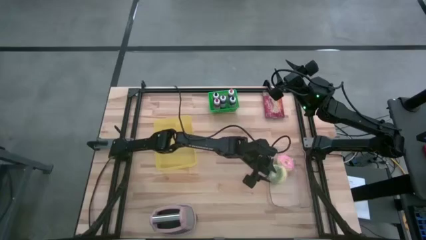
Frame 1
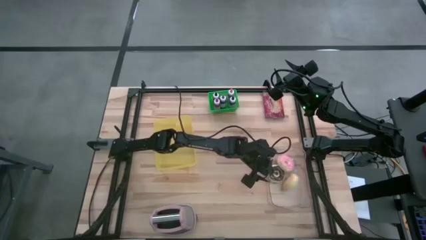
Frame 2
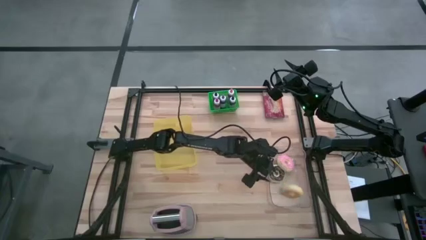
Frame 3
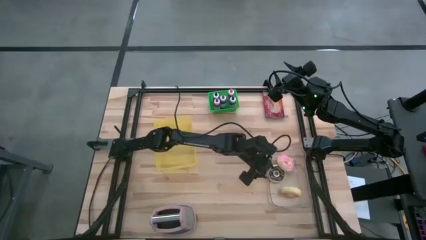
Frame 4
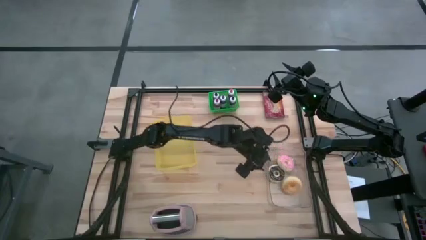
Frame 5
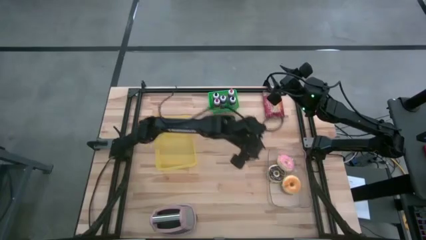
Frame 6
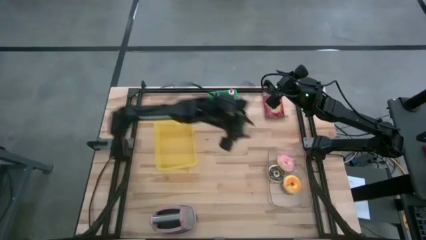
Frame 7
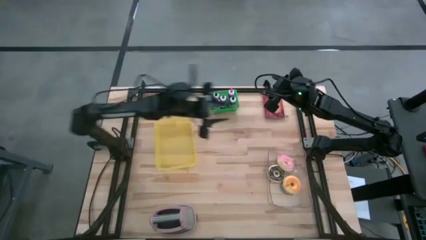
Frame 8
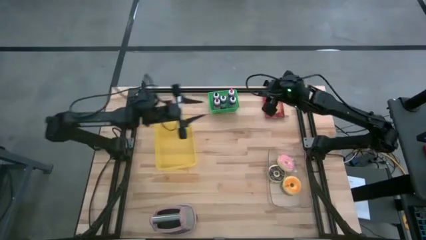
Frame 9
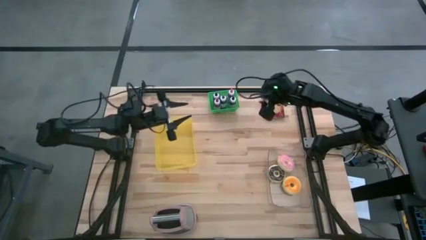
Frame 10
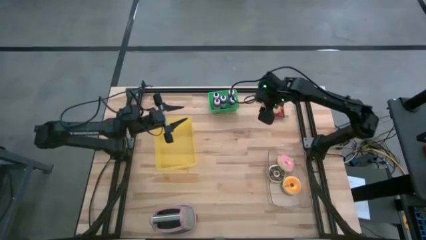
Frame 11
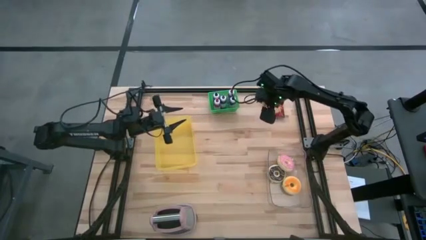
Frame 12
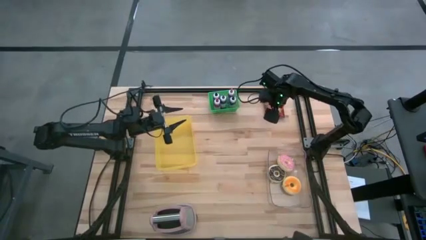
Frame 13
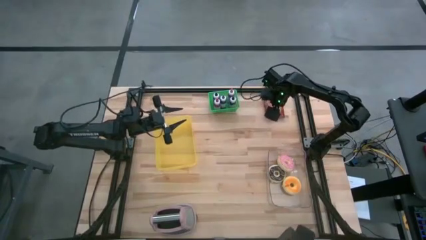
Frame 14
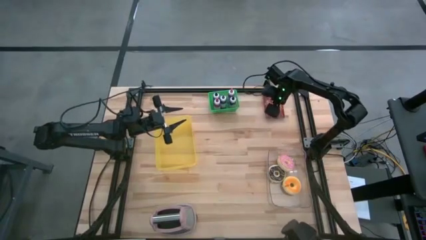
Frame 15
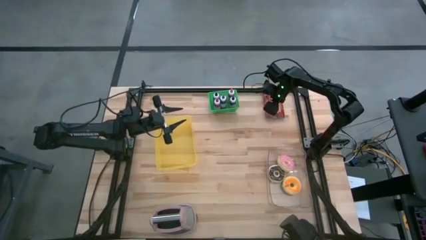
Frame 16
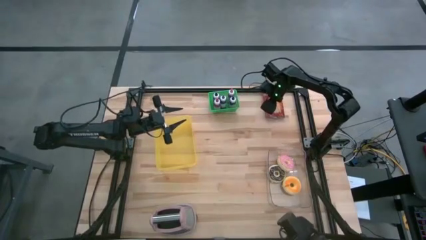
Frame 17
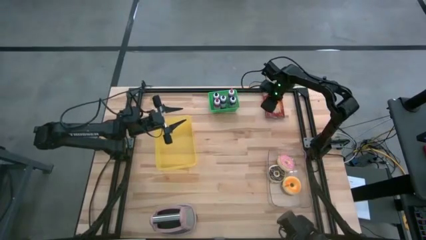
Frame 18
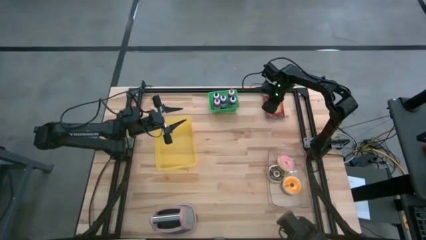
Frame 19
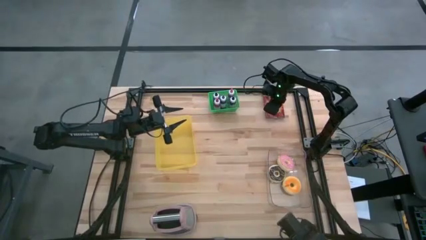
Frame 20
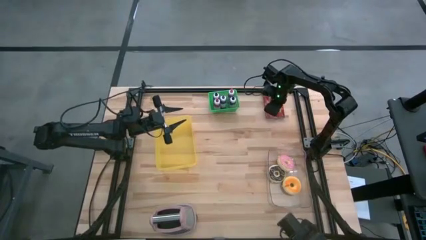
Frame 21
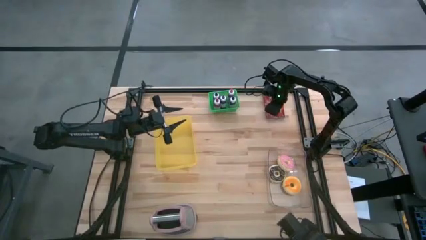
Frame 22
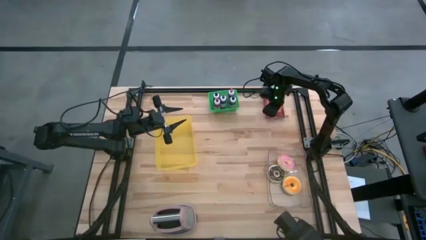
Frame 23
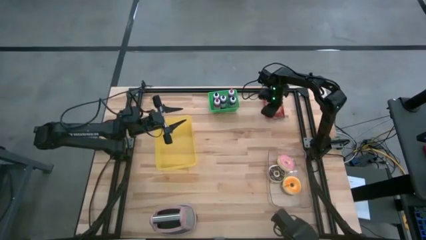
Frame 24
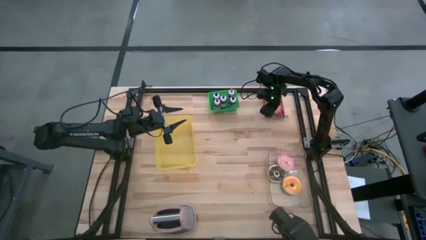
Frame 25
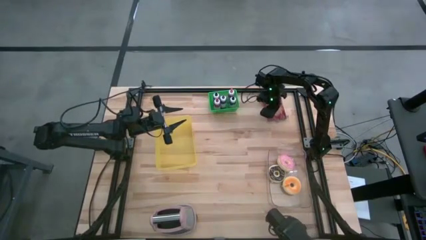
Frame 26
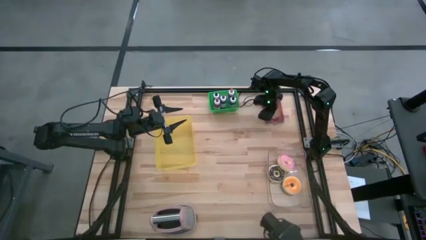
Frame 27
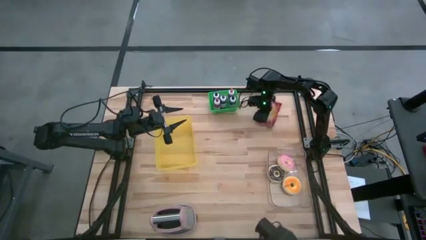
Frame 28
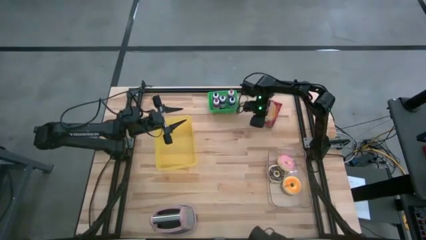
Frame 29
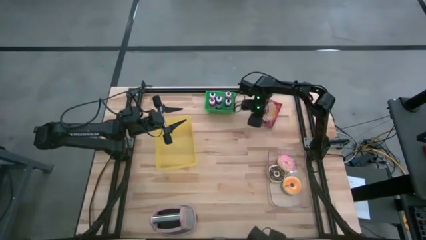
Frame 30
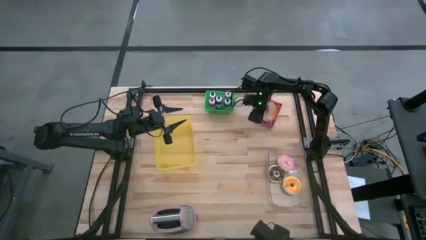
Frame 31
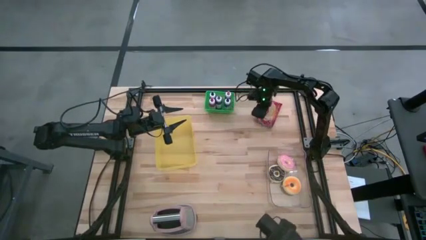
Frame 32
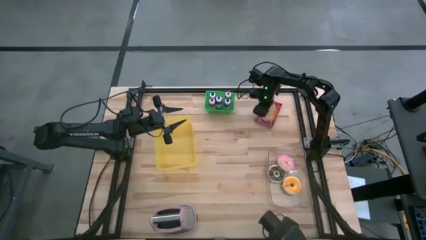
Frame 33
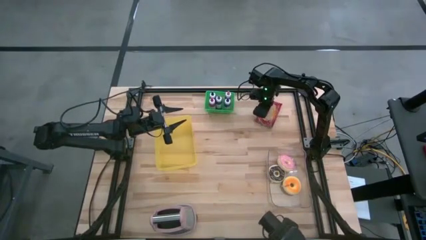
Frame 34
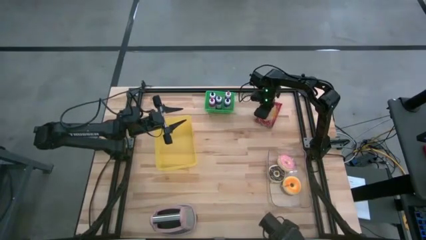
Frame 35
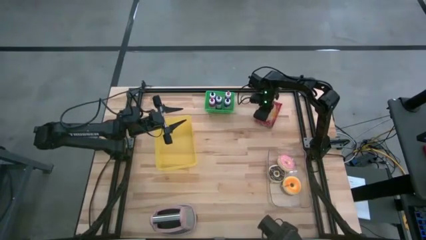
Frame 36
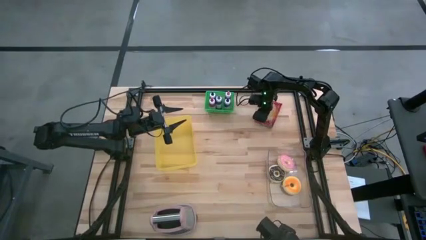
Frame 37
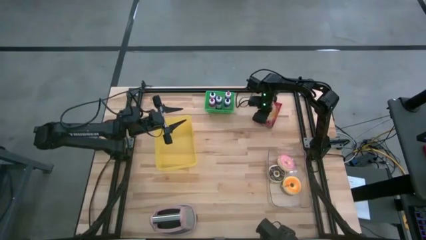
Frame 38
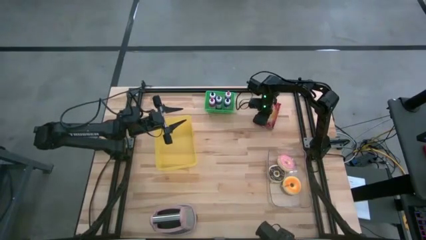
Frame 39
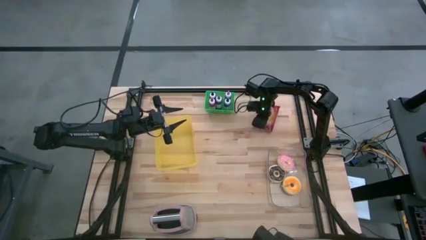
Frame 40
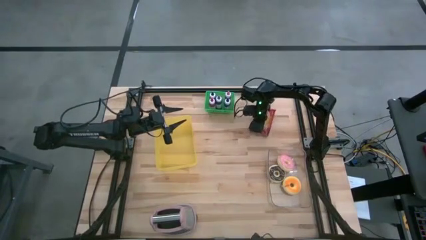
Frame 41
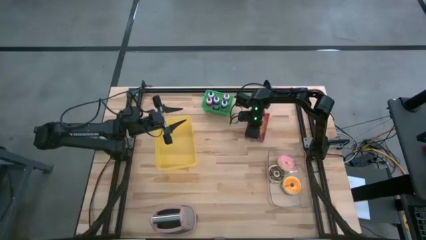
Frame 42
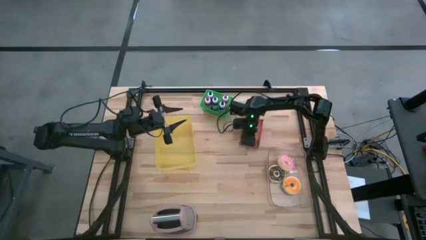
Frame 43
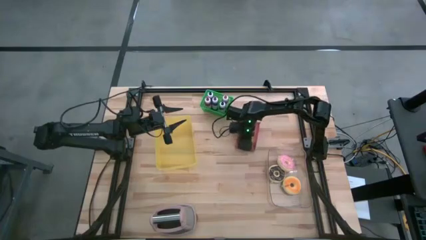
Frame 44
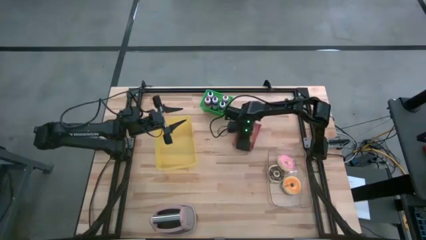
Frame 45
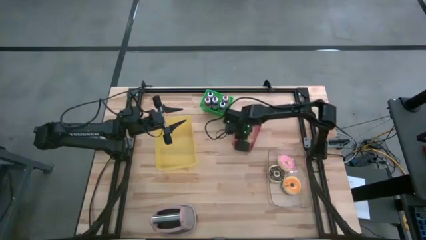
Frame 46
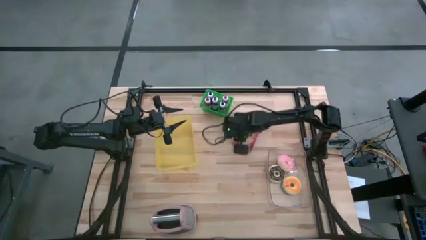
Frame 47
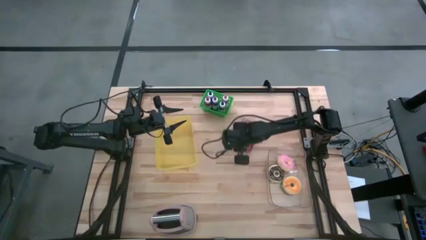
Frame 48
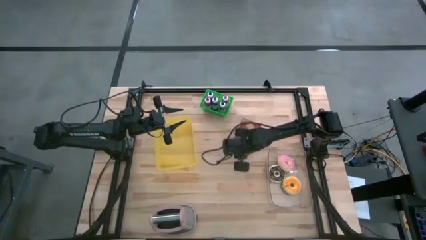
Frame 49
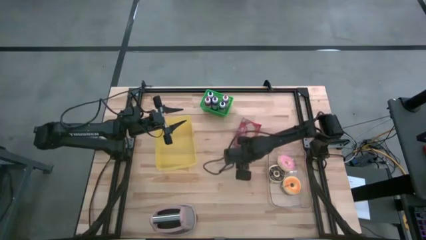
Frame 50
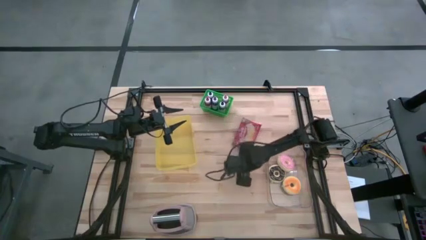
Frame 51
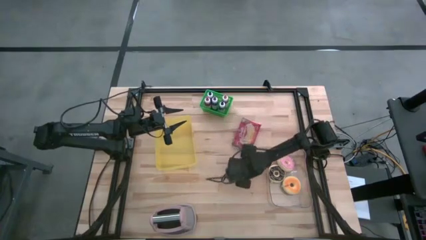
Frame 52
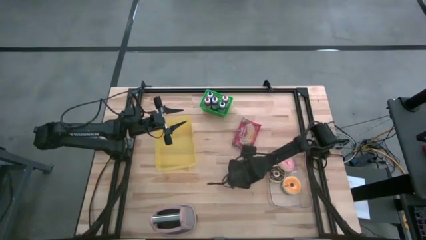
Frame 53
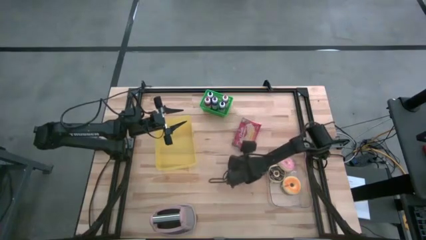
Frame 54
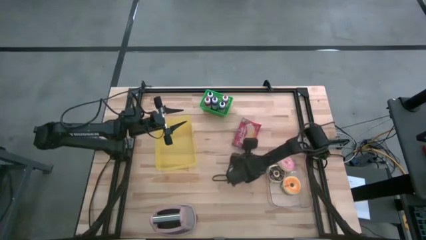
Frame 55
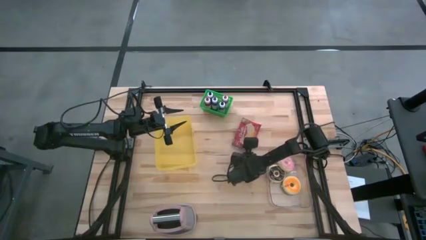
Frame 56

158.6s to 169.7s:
Task: Pick & Place Food Item
Put the red popcorn bag into the yellow bin

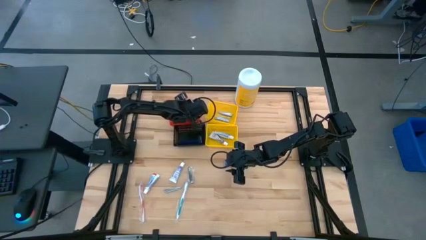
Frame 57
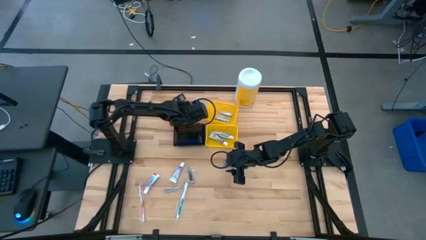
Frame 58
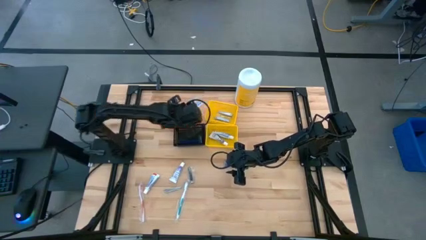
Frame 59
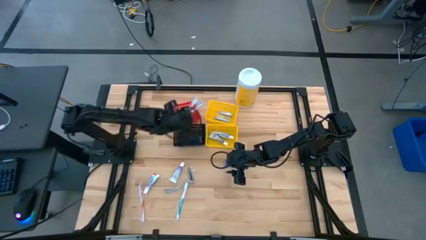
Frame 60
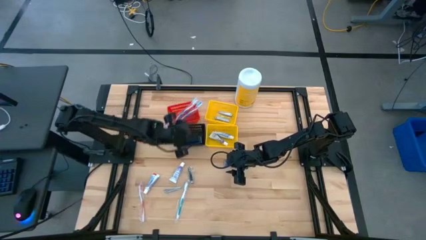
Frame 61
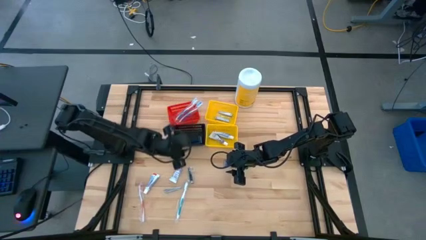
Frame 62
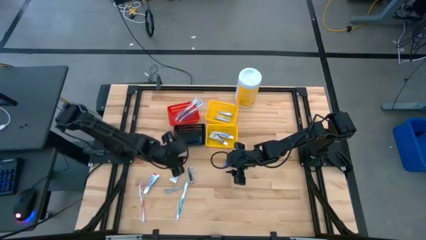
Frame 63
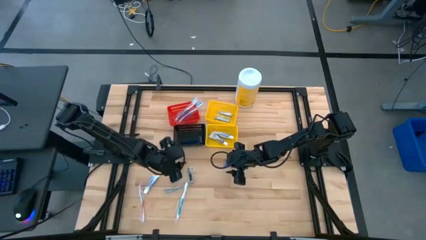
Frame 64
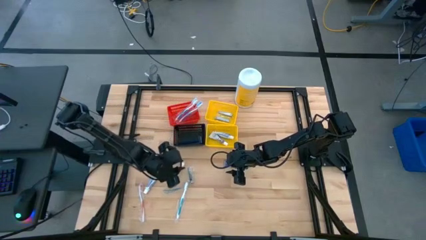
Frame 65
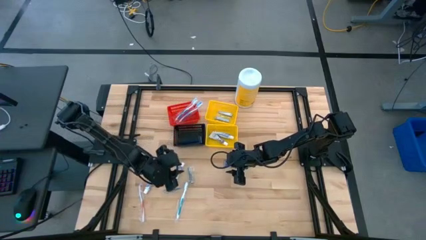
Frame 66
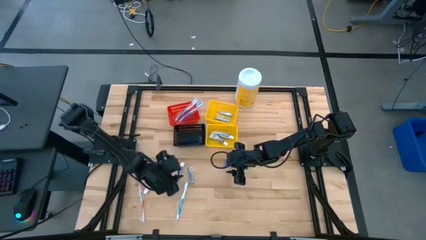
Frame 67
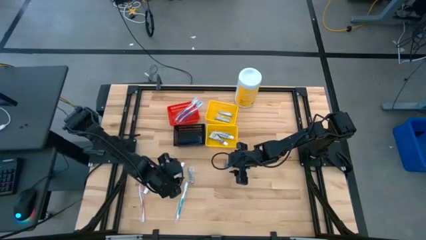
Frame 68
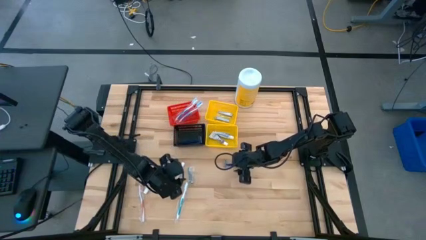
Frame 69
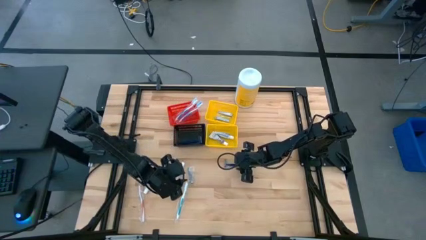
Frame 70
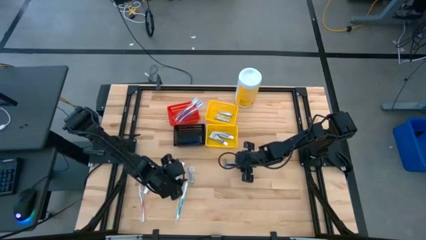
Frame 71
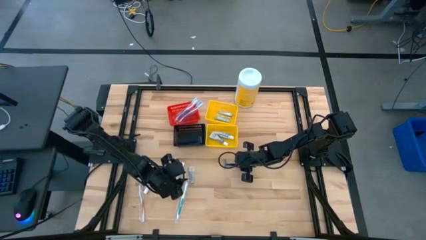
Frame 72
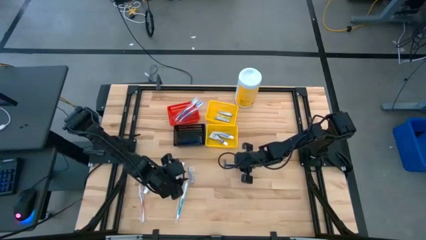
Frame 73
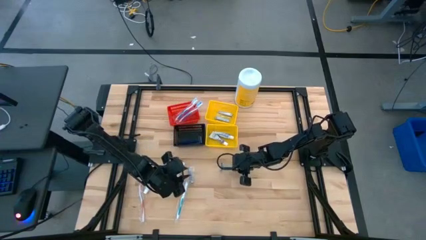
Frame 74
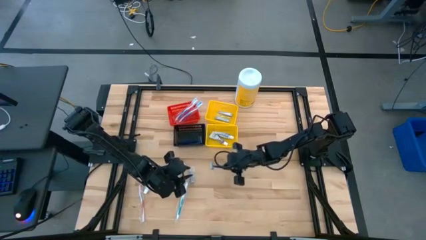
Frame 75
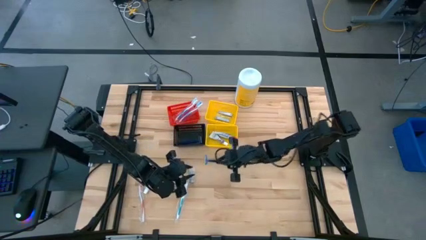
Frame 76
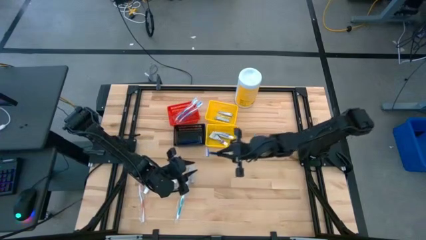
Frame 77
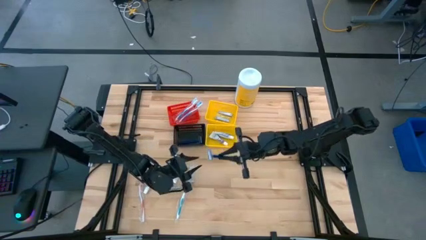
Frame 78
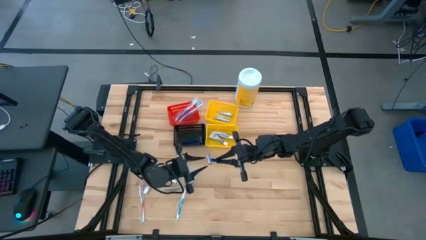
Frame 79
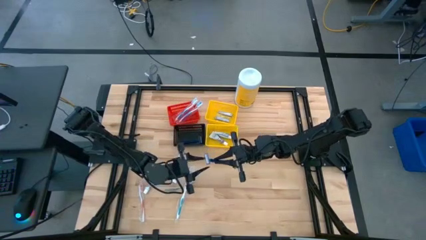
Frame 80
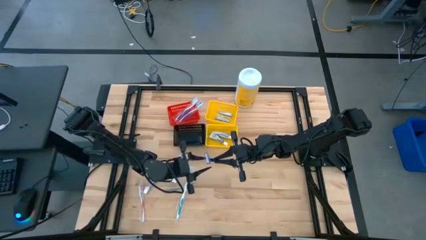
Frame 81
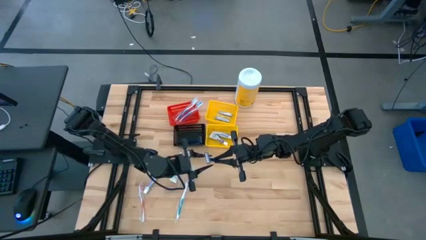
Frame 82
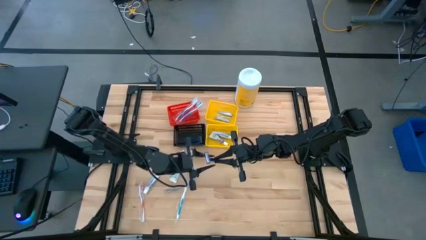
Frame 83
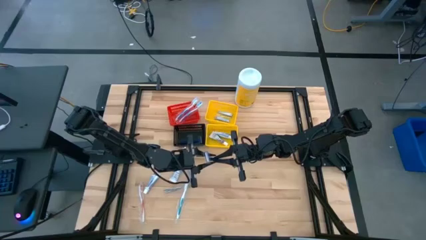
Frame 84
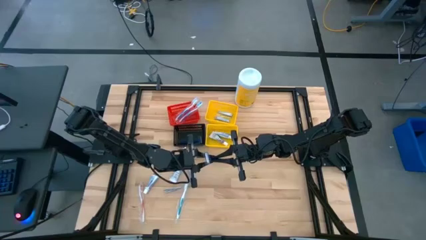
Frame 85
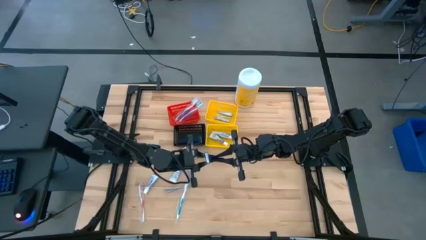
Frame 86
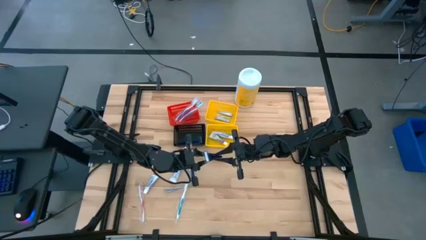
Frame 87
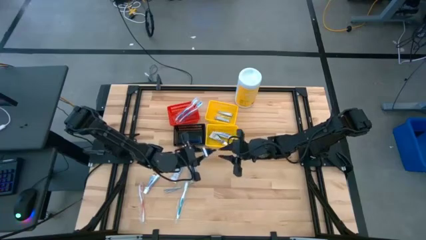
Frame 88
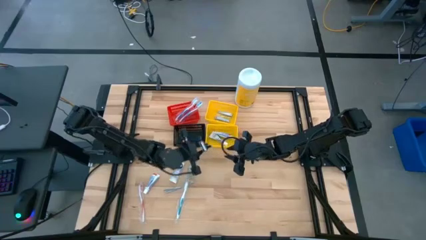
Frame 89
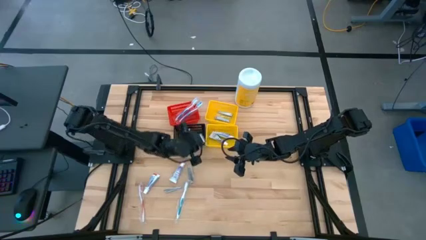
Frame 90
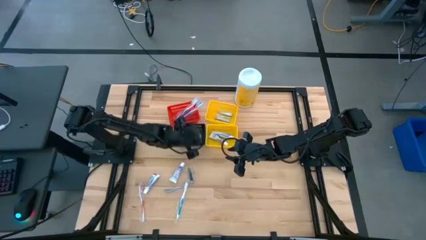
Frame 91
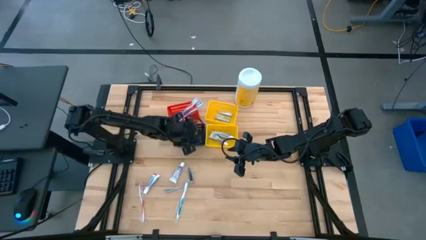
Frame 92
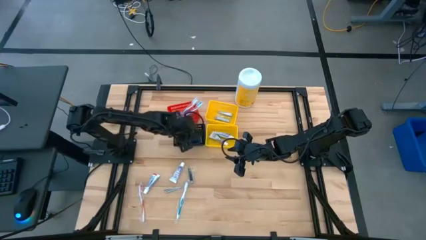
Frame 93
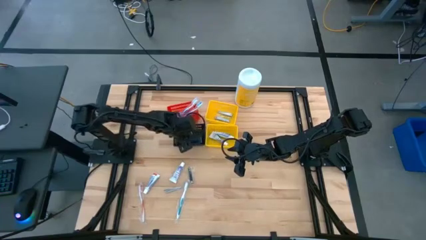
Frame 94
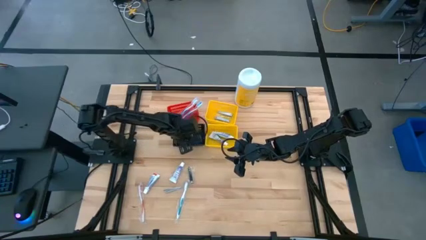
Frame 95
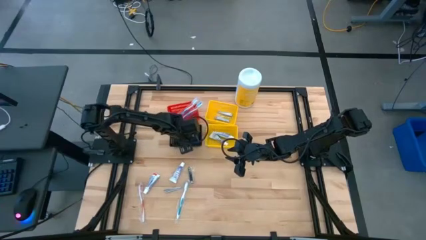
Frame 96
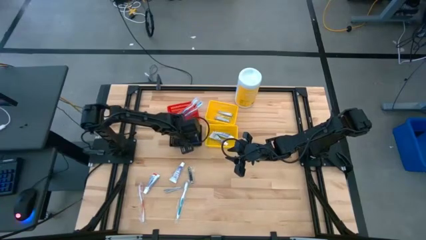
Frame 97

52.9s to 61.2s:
Task: Pick & Place Travel size toiletries
Put the blue razor into the black bin
